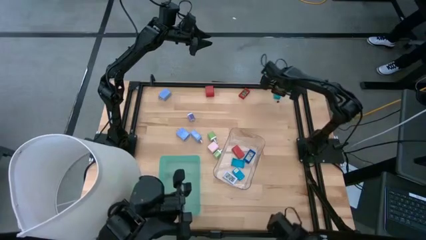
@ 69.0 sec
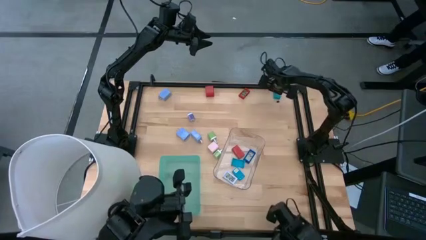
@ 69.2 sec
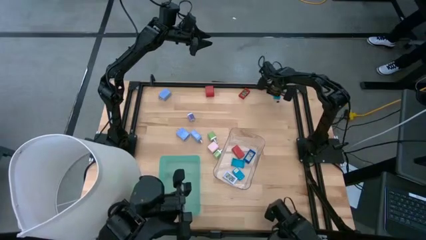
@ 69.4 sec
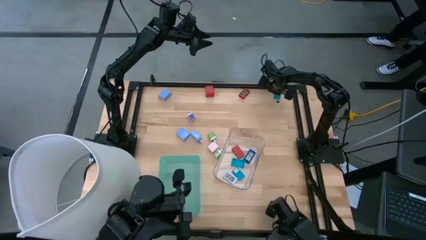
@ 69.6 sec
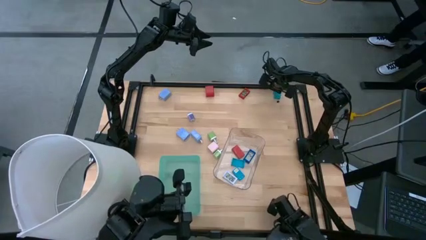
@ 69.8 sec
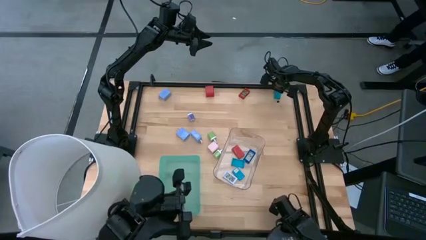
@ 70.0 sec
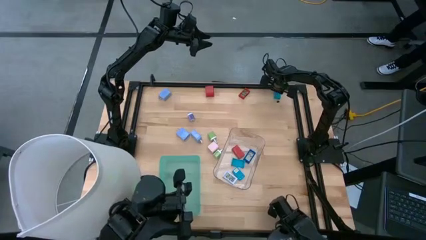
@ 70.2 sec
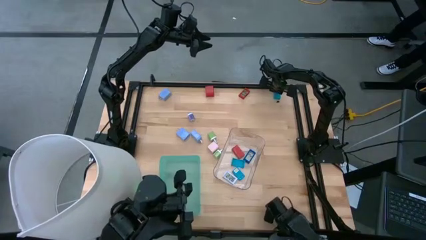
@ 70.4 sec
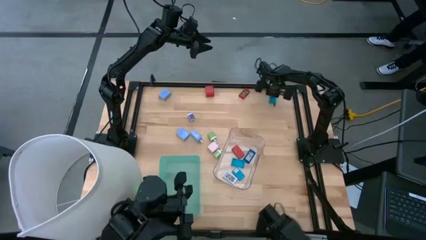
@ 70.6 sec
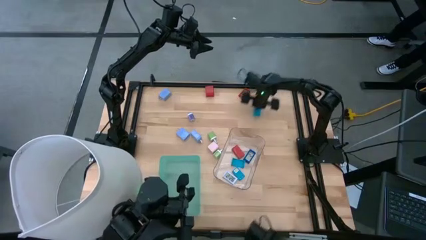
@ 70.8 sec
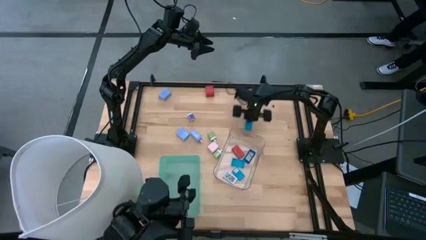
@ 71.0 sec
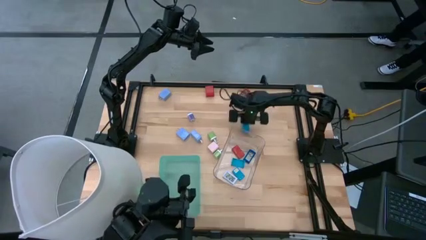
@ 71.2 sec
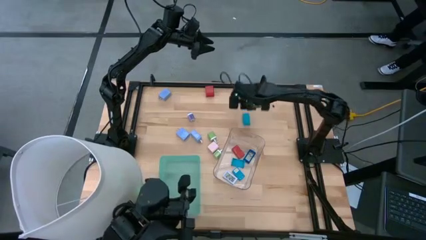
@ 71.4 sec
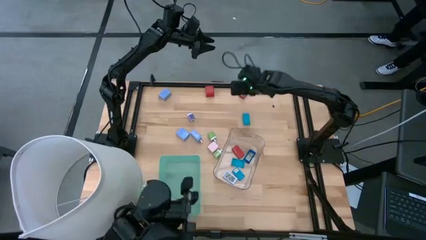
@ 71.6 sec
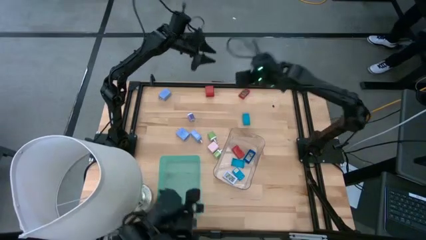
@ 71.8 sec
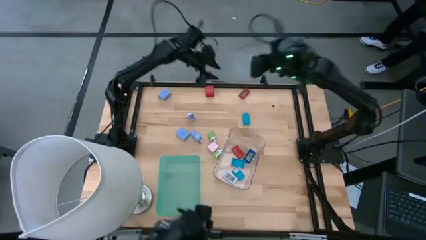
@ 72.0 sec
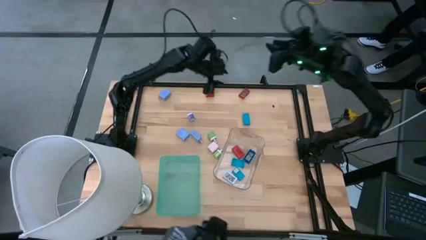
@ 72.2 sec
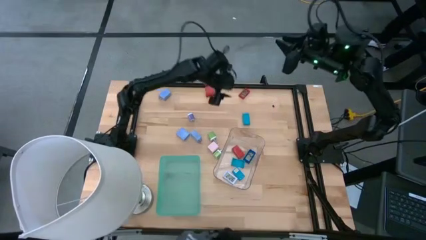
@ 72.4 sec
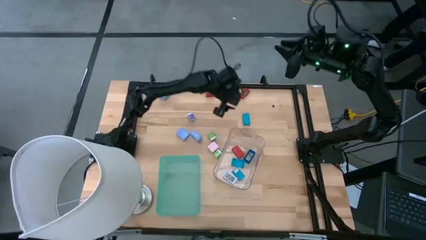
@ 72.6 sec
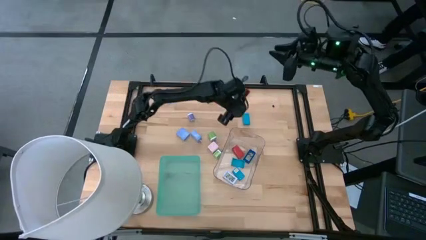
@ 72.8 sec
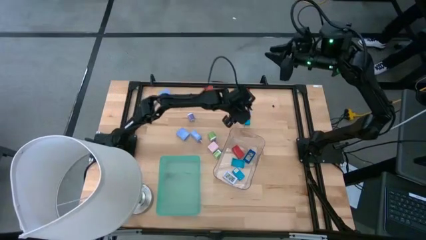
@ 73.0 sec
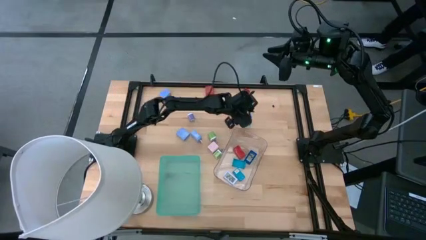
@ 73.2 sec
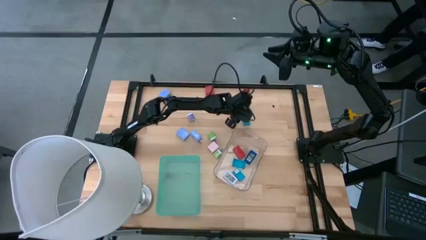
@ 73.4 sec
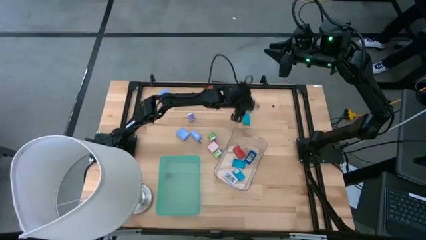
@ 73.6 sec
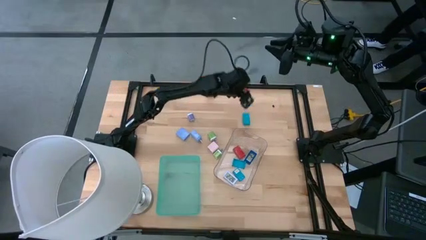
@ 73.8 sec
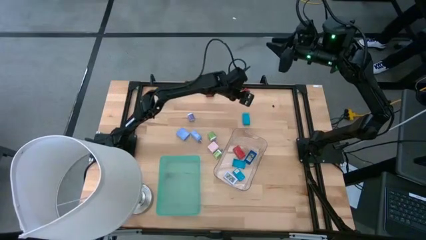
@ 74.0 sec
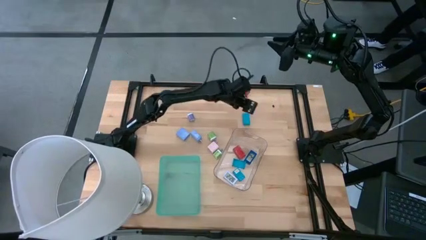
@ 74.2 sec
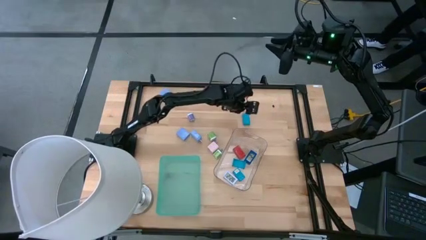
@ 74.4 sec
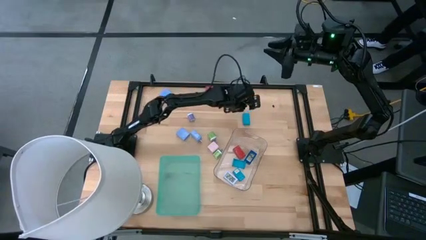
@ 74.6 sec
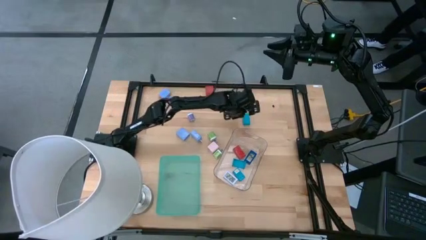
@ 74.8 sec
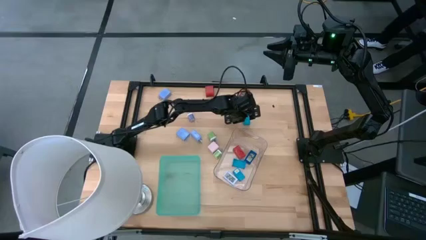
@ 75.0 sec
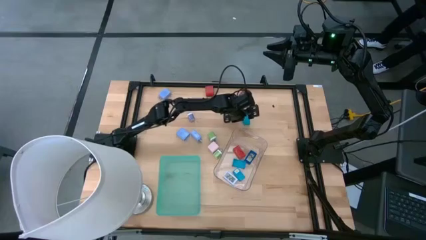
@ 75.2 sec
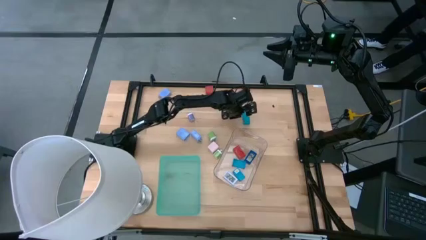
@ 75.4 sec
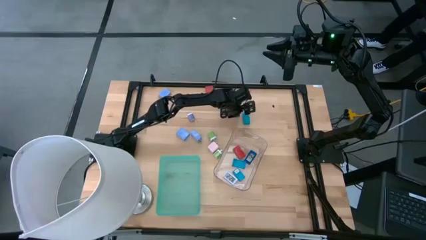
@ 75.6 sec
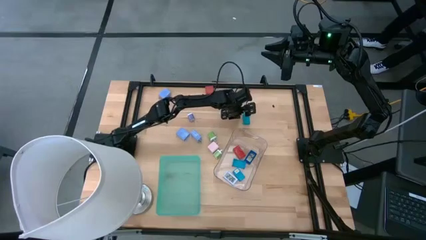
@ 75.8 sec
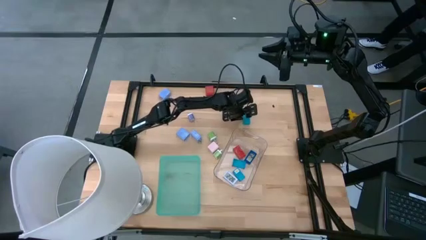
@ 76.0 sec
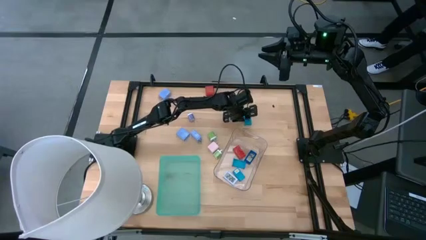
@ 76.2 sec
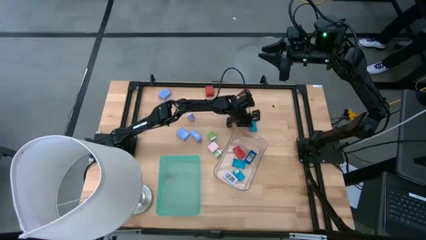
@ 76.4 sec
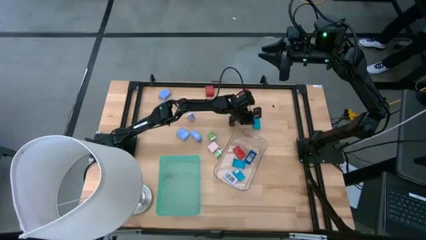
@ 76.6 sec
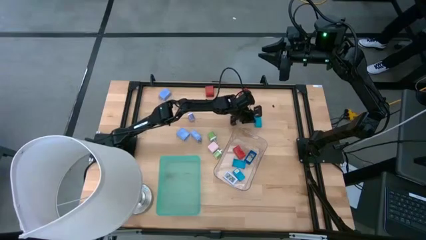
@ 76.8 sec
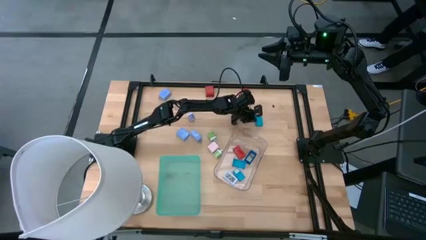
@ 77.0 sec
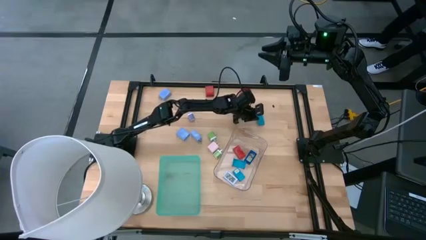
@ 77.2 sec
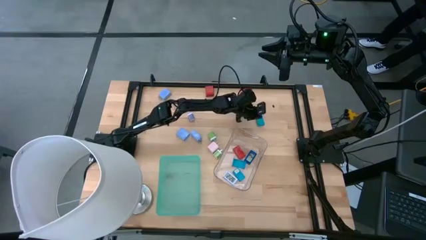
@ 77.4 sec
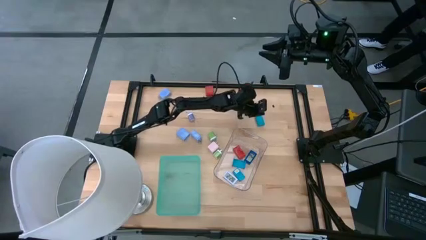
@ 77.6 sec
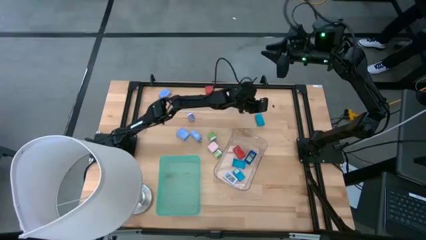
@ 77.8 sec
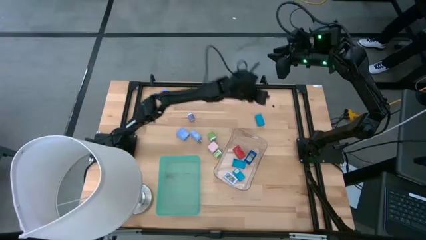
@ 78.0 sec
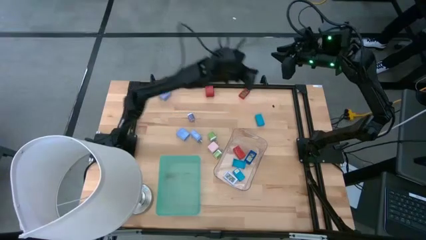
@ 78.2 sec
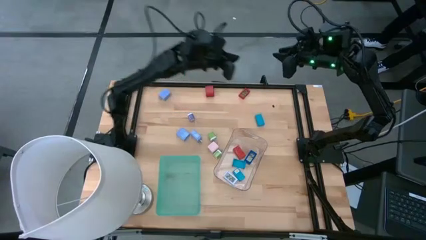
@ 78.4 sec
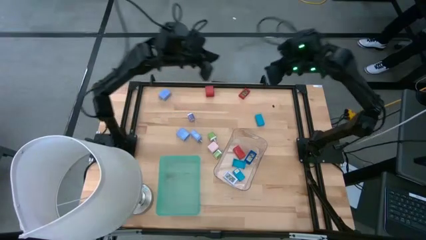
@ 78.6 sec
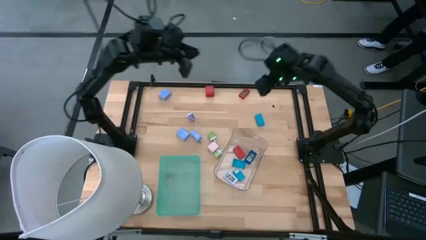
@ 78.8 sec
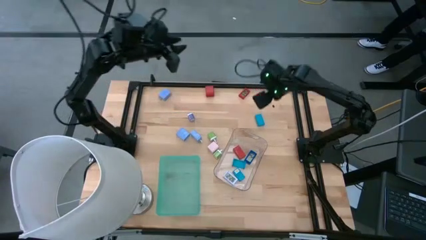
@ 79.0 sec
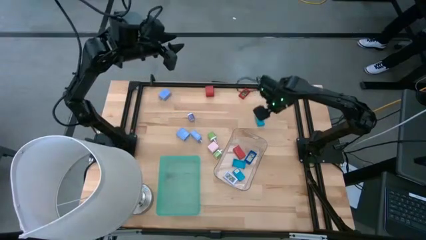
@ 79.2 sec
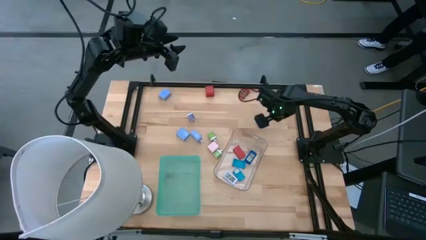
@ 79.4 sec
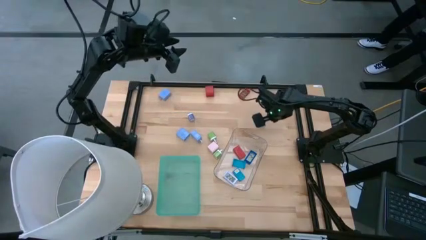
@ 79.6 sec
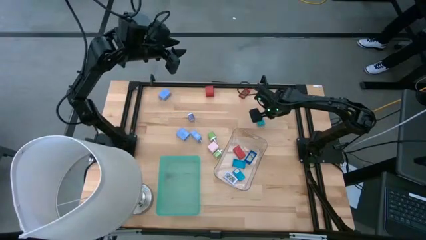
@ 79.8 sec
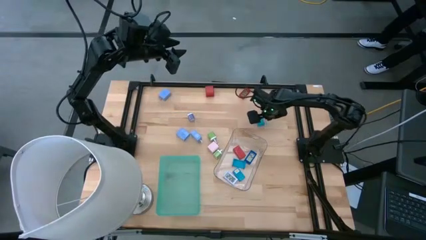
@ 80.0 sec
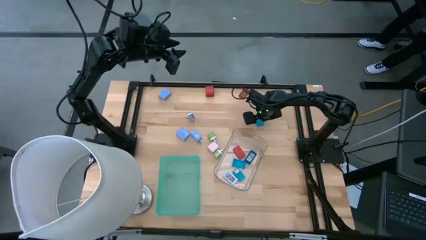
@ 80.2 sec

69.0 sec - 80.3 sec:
Task: Pick & Place Office items
Put the light blue digital clock into the transparent bin

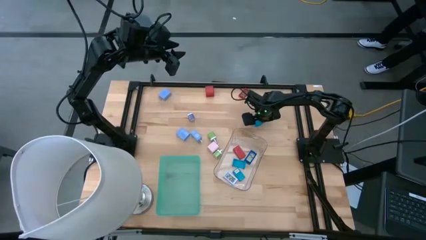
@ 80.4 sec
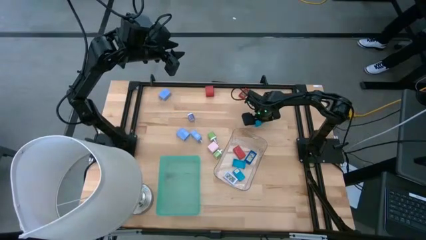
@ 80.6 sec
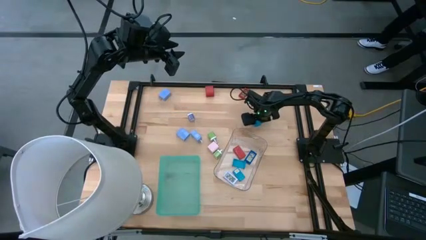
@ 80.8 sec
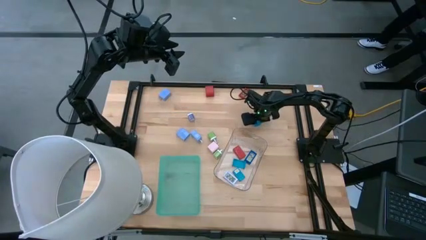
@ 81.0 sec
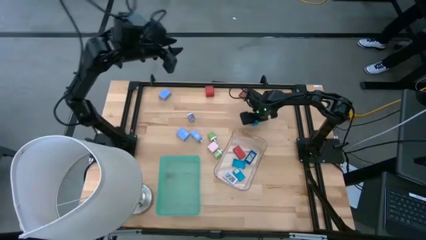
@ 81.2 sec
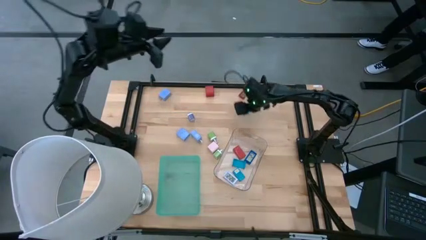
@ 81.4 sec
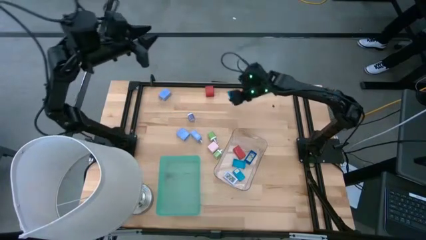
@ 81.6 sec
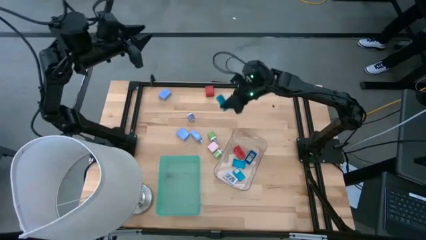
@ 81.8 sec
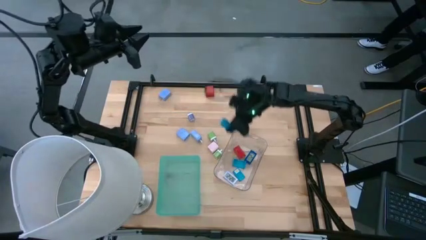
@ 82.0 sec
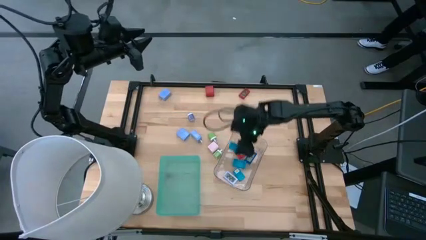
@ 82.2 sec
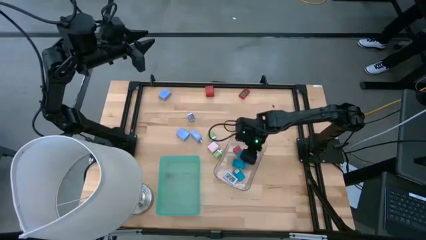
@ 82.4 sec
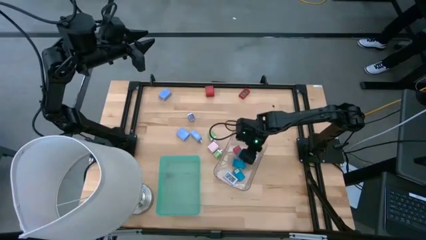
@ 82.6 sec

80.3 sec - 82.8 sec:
Put the light blue digital clock into the transparent bin

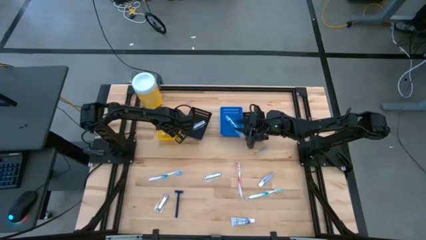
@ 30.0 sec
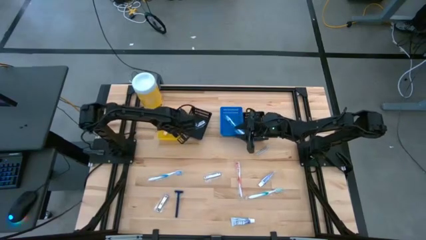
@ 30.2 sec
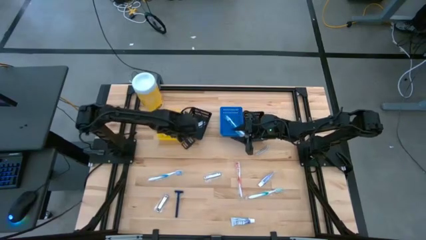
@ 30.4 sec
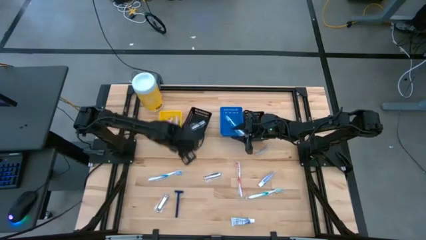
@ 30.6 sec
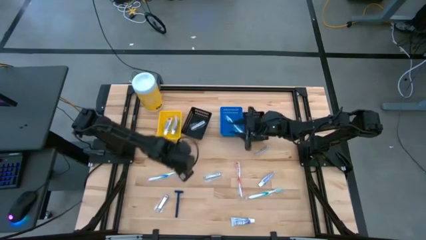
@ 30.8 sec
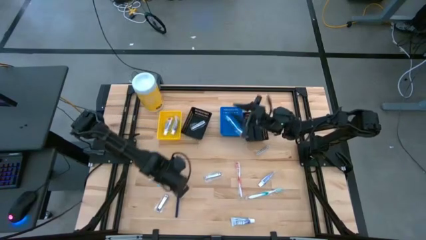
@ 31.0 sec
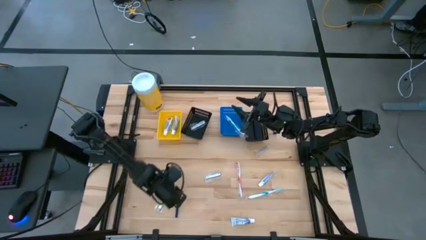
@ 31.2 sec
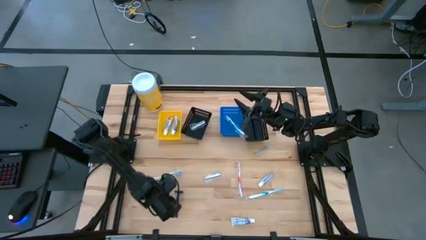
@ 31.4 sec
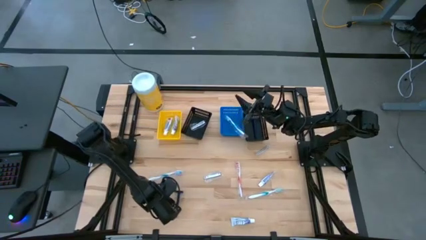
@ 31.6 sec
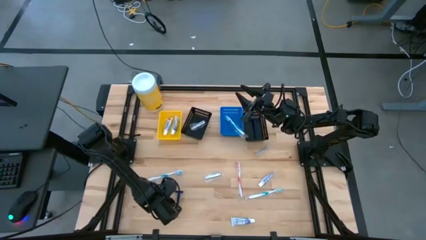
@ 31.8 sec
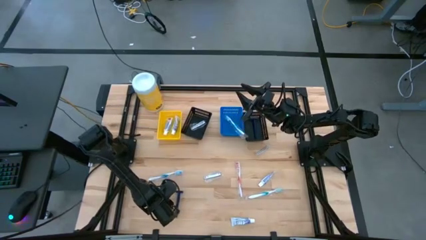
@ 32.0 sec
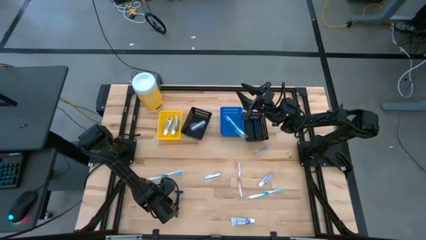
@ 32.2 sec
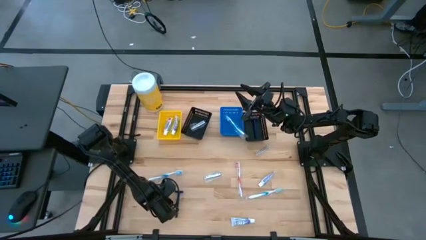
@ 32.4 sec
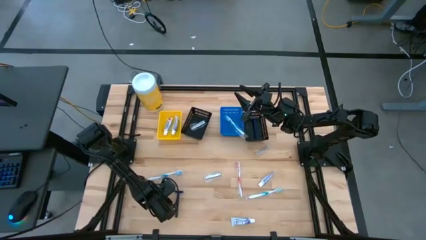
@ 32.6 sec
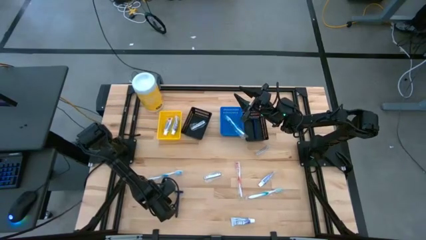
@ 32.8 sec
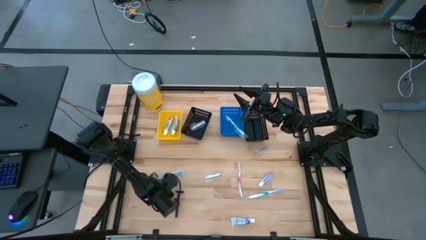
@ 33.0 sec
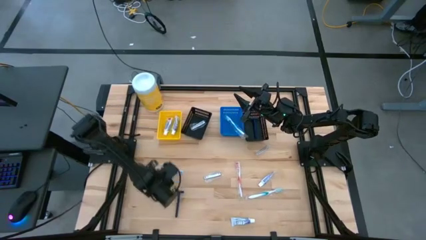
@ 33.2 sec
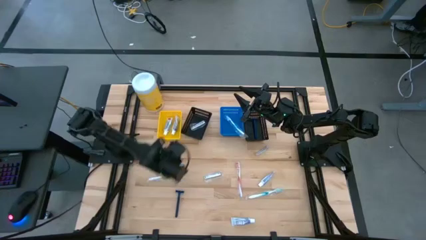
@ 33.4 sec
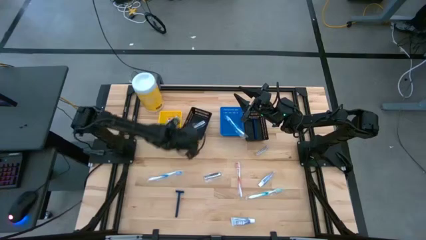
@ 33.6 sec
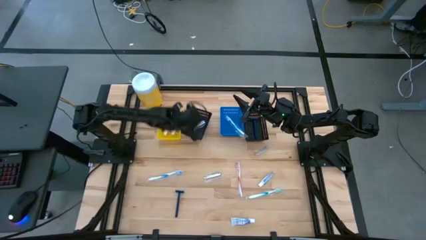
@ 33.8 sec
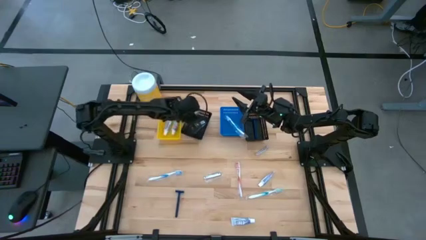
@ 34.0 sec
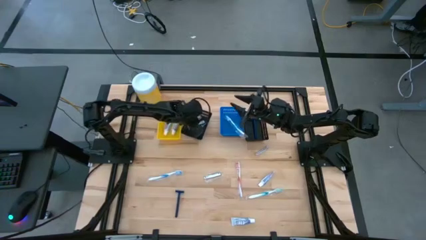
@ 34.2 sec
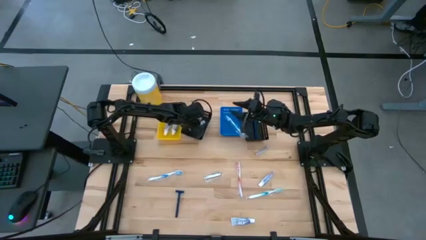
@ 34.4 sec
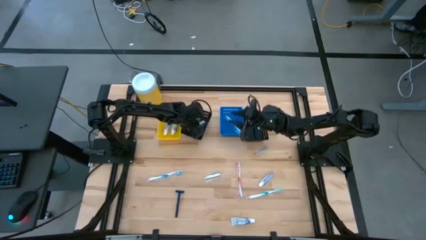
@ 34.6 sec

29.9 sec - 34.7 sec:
Task: Pick & Place Travel size toiletries
Put the silver nail cutter into the right black bin
